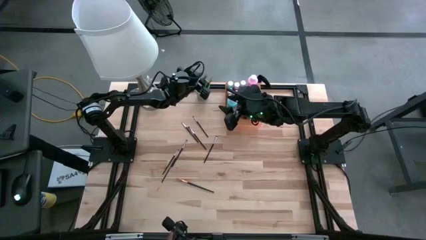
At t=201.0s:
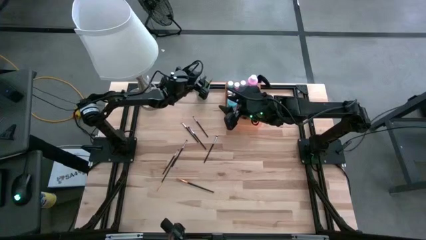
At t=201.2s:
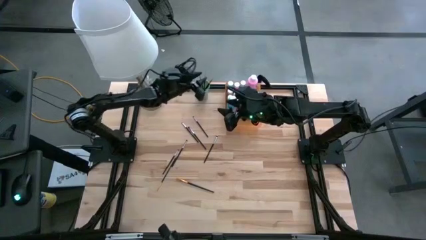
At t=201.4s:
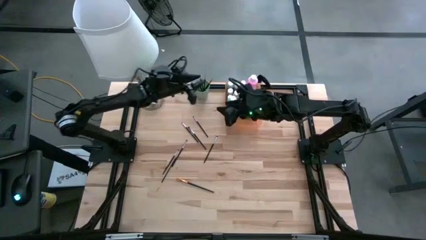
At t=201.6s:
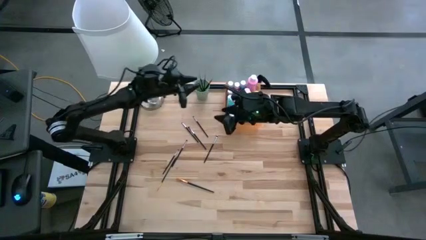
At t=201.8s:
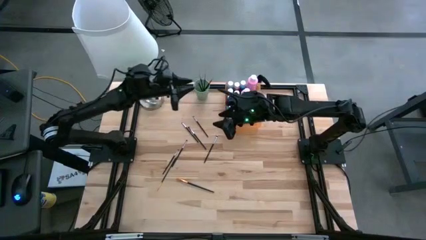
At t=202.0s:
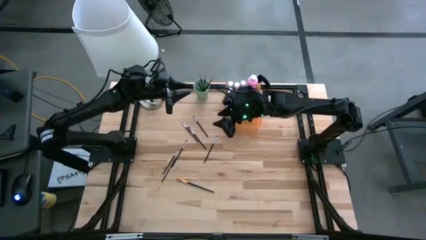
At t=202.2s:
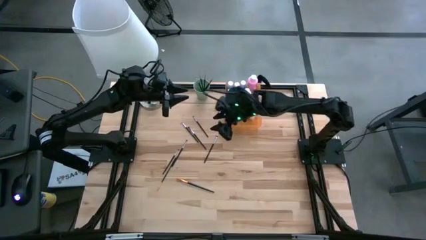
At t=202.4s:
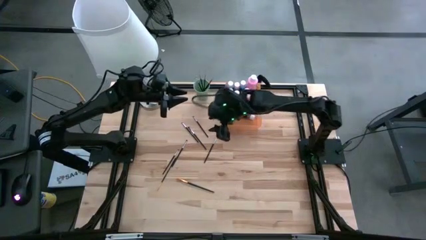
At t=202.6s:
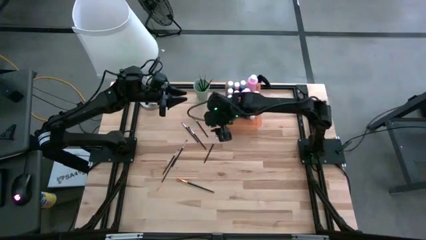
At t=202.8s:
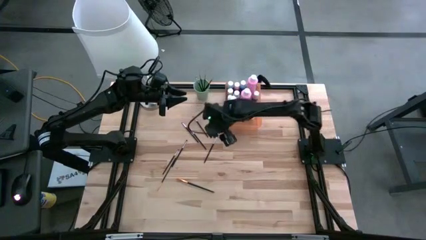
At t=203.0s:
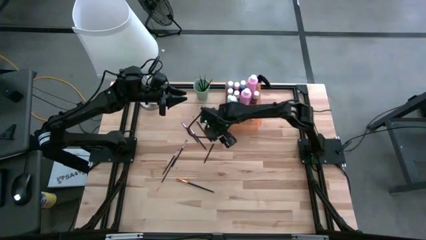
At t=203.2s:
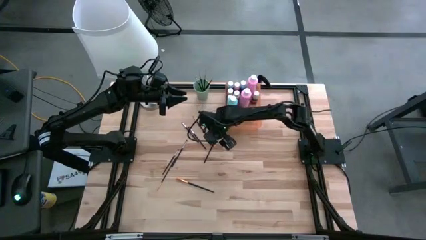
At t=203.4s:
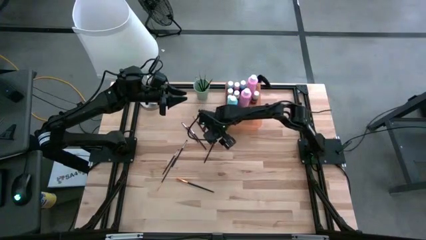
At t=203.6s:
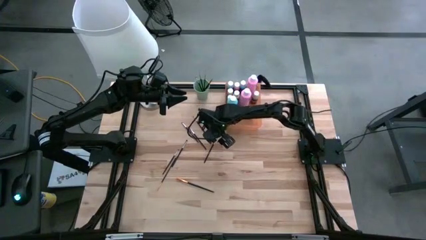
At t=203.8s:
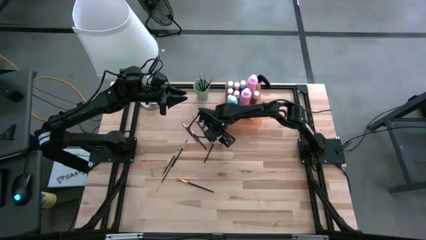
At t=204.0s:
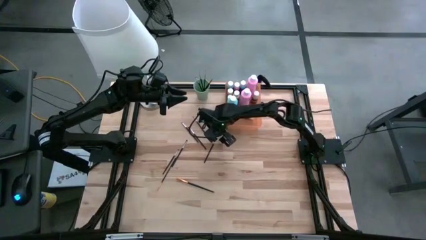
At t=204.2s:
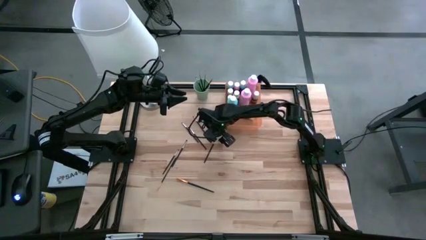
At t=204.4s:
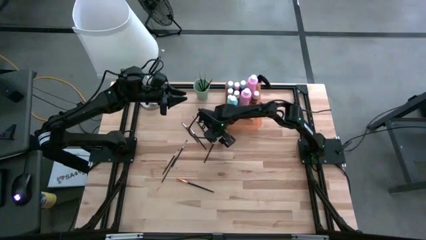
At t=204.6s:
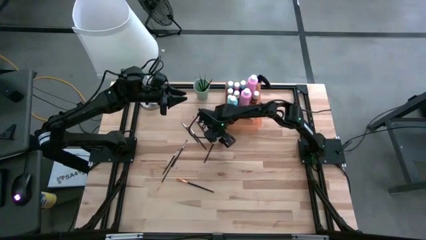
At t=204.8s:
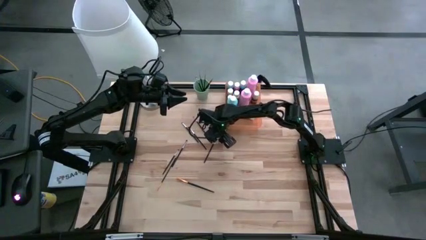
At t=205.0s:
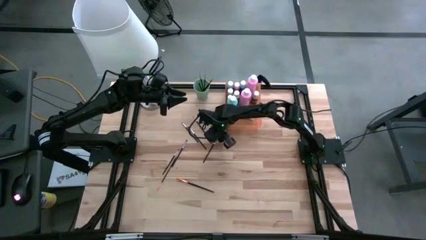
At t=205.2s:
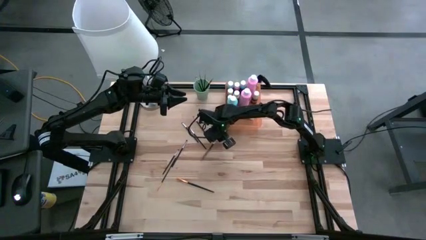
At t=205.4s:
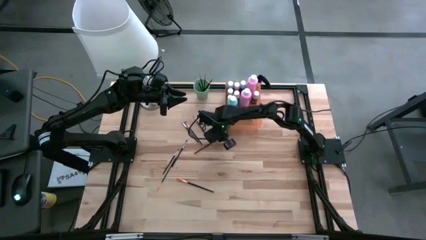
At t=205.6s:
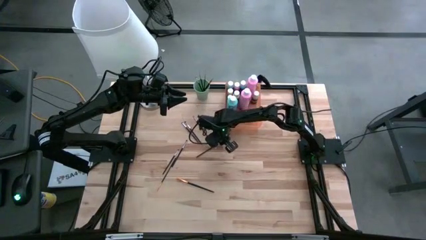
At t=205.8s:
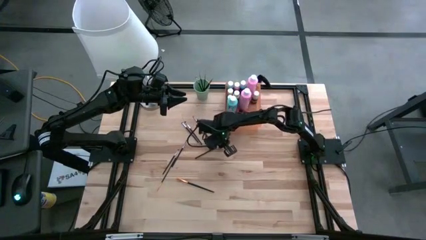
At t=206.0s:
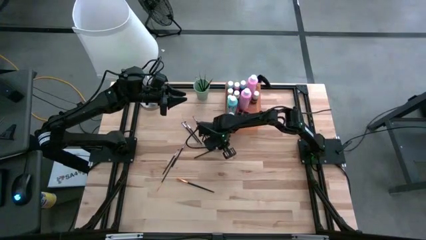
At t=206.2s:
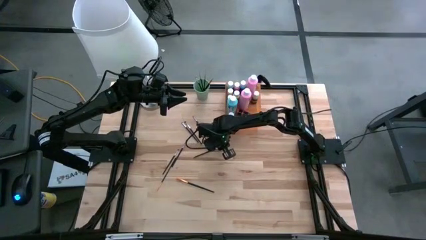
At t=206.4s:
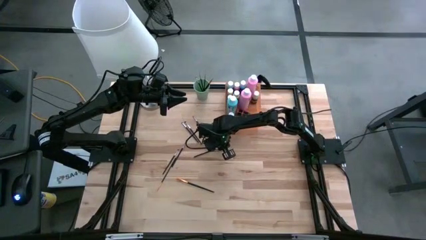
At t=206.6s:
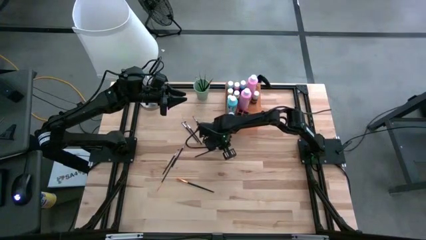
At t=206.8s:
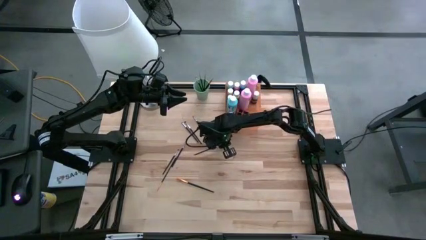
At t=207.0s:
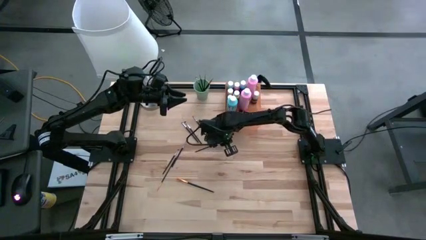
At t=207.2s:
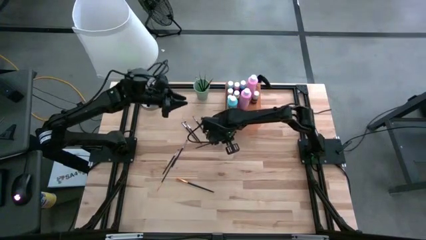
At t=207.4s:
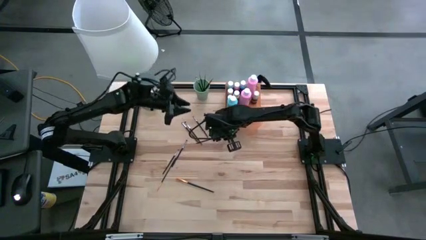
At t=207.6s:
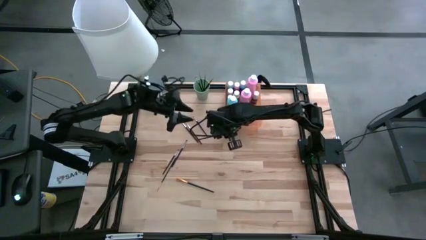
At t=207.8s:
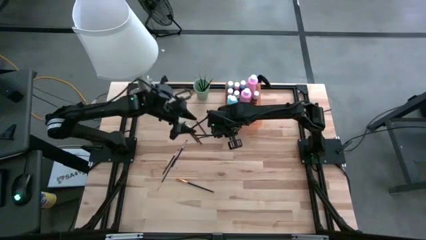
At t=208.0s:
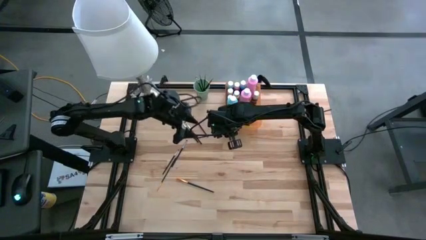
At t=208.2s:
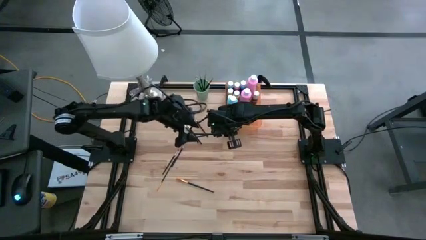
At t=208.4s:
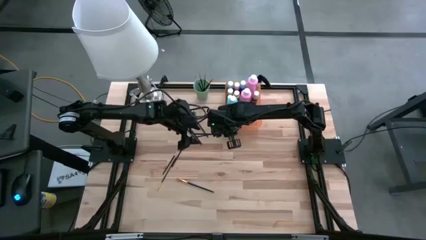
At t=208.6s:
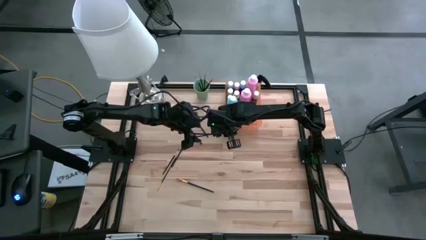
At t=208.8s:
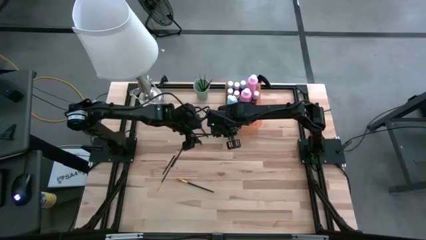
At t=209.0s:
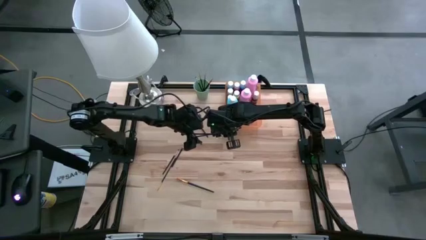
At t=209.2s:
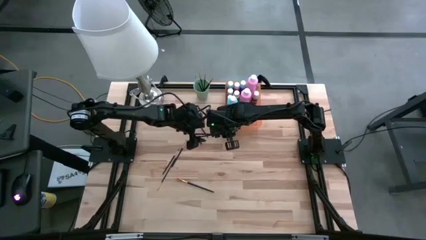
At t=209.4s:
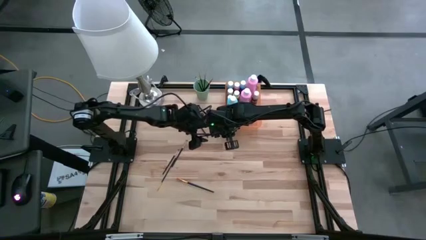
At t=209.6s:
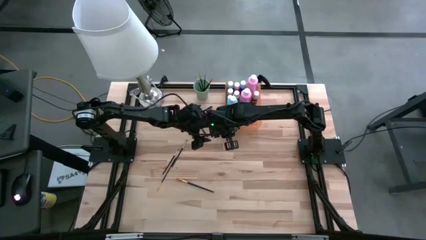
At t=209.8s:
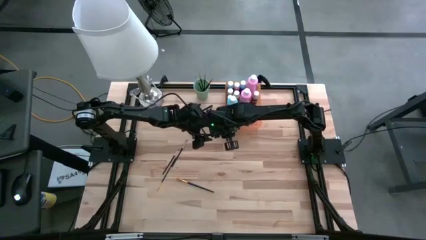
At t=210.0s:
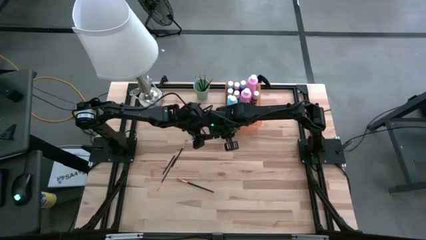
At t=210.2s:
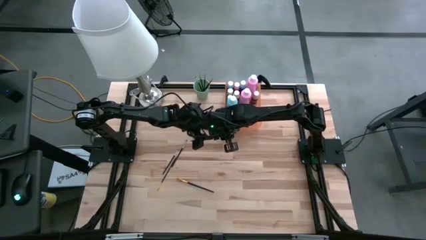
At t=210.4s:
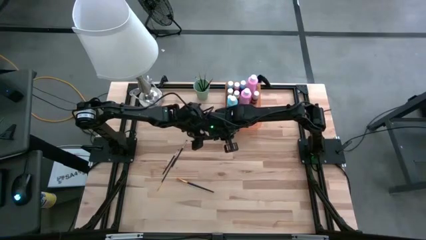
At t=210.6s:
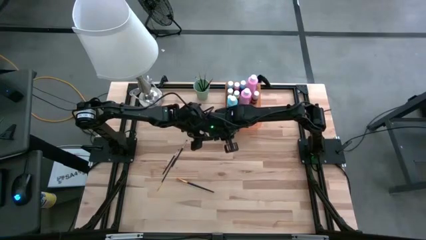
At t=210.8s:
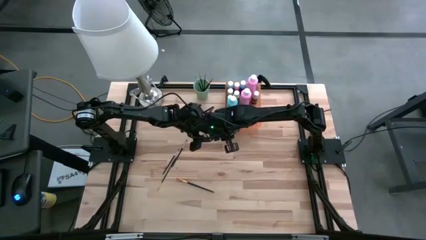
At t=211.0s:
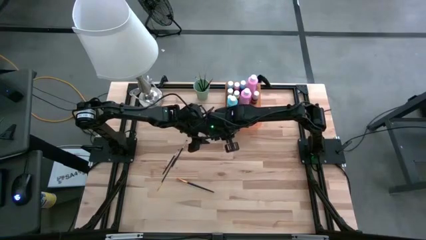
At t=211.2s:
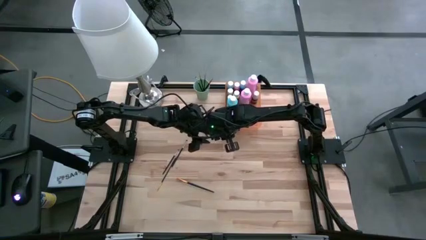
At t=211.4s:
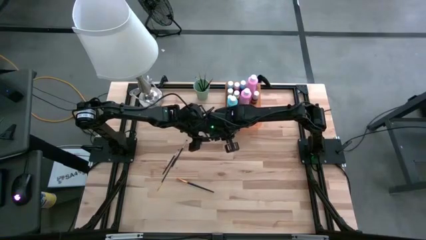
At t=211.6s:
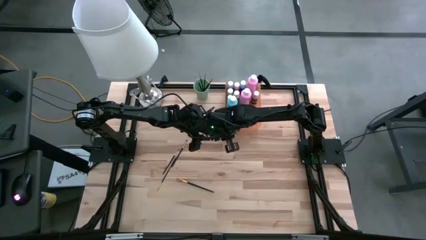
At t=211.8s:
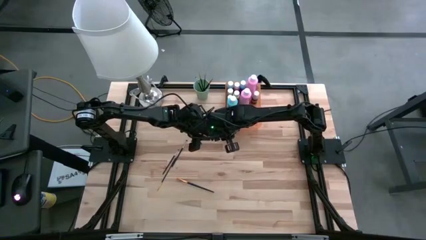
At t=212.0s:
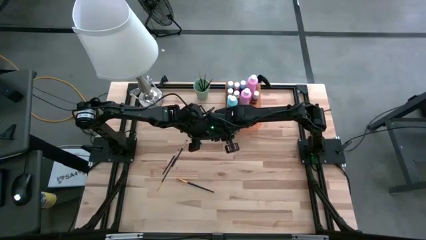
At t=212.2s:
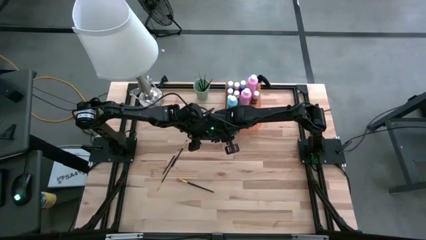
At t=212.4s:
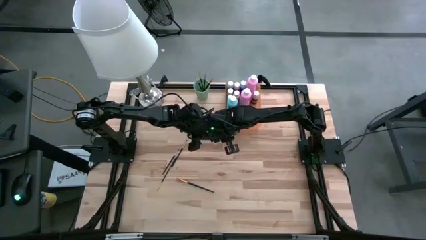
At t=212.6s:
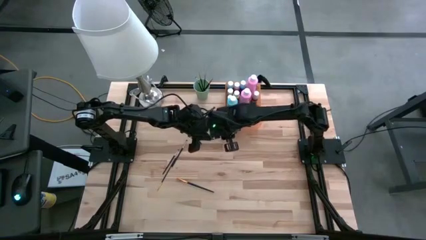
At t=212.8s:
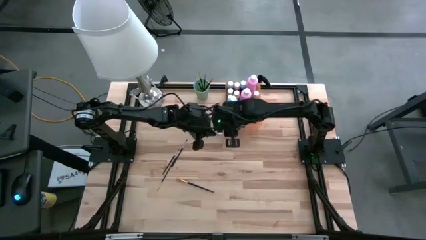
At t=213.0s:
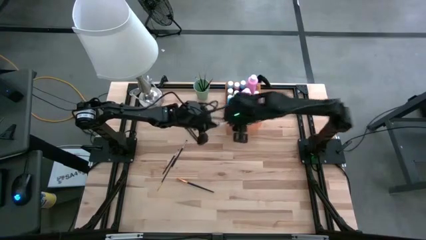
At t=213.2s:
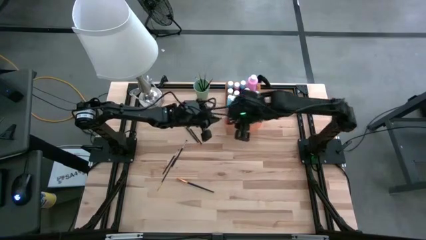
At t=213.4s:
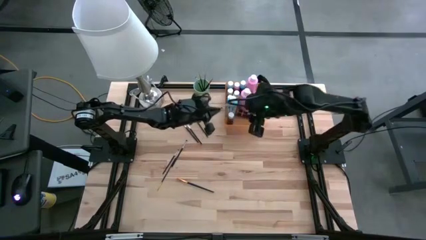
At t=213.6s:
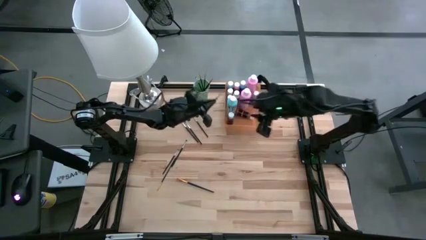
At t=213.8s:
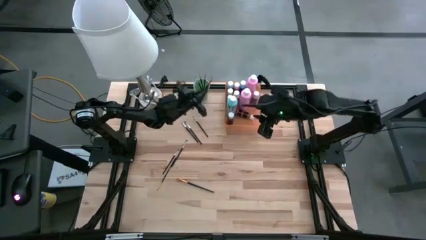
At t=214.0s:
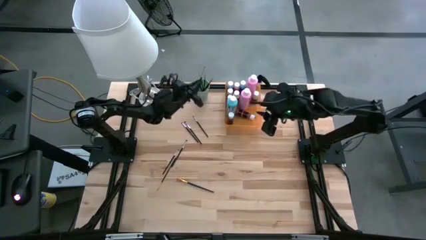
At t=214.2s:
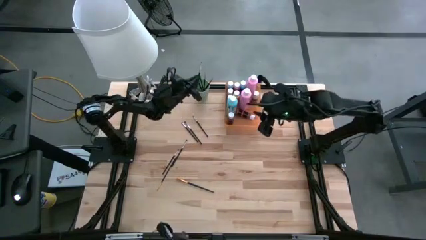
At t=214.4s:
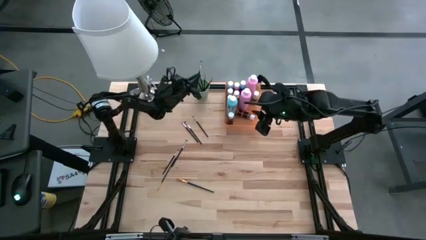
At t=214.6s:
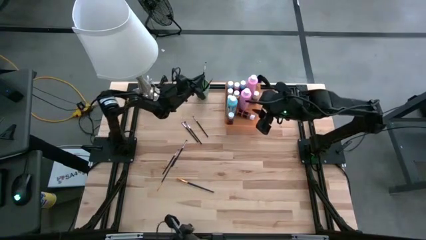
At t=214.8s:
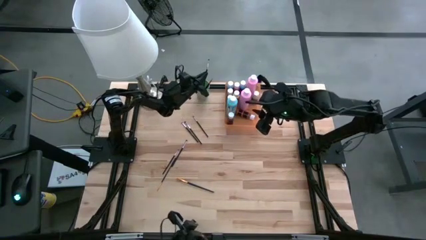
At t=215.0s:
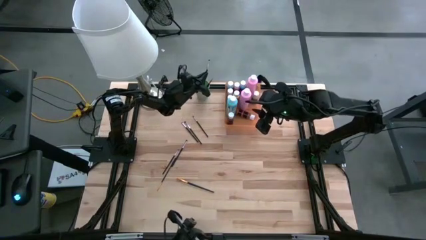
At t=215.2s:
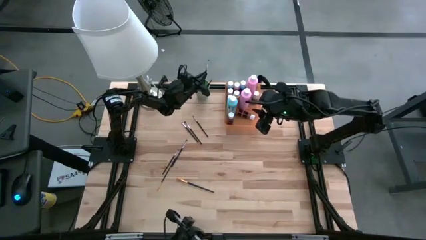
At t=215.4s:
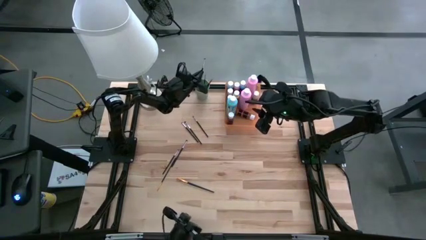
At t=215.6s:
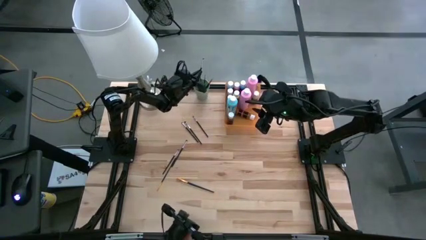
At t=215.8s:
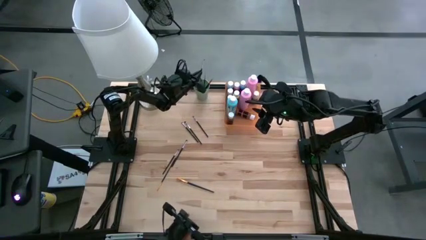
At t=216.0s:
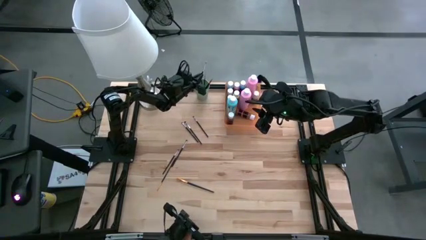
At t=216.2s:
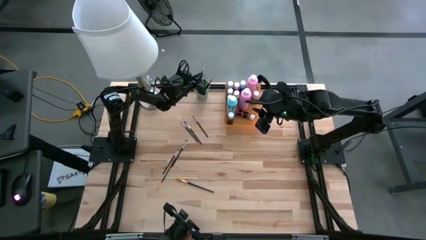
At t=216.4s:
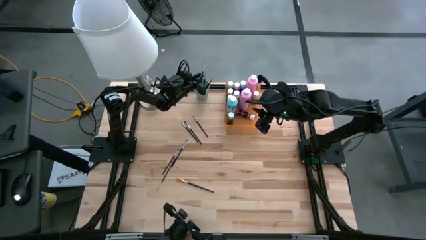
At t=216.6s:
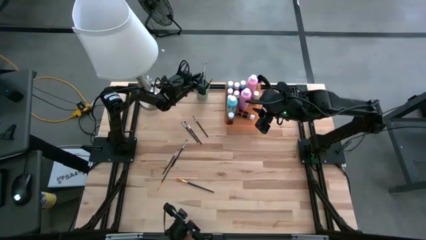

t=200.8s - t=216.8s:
Task: Pick & Place Paint Supplies
Put the black paint brush into the green cup
